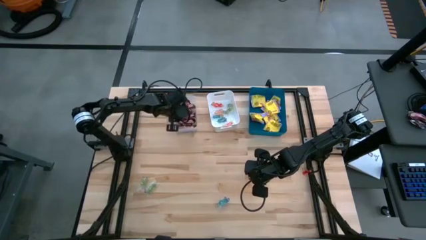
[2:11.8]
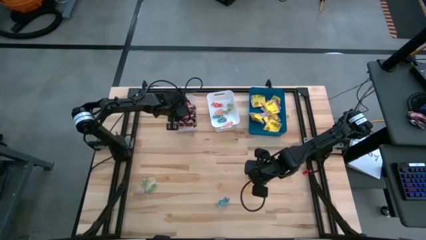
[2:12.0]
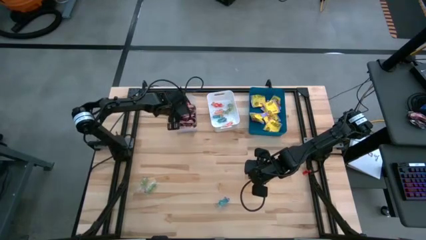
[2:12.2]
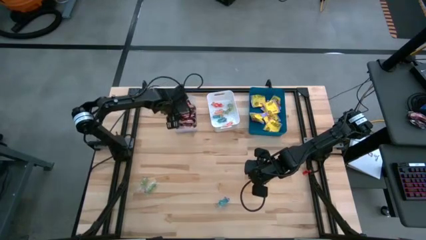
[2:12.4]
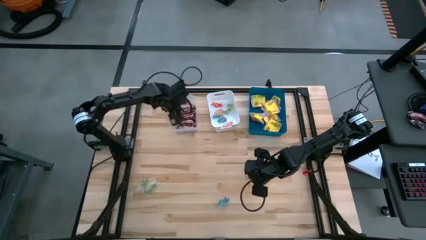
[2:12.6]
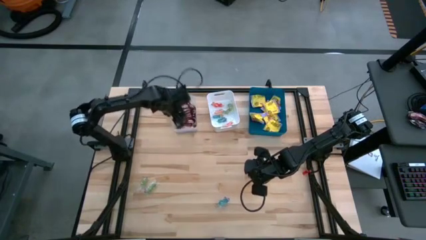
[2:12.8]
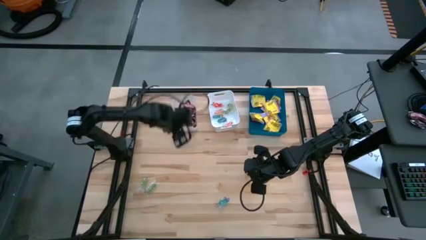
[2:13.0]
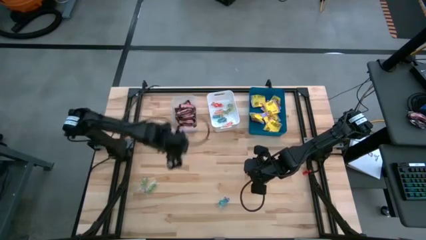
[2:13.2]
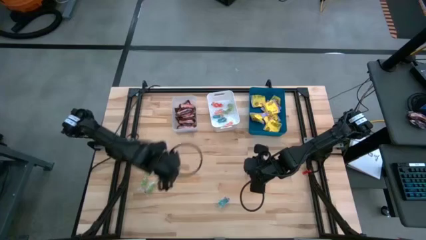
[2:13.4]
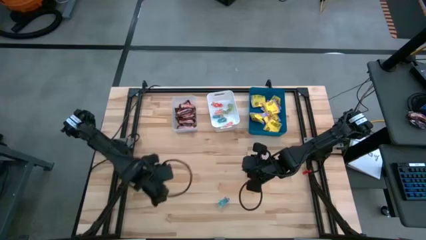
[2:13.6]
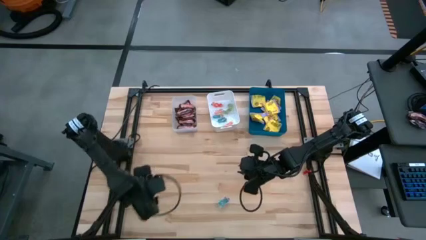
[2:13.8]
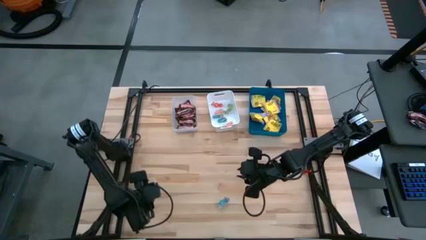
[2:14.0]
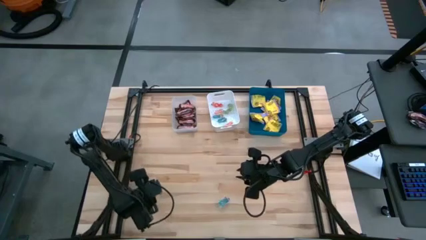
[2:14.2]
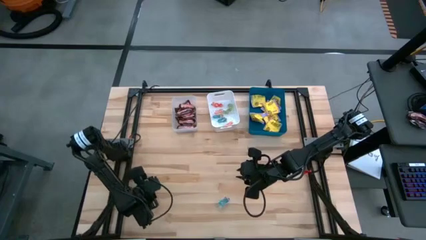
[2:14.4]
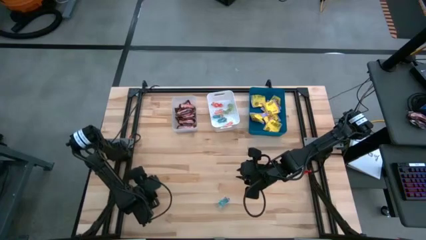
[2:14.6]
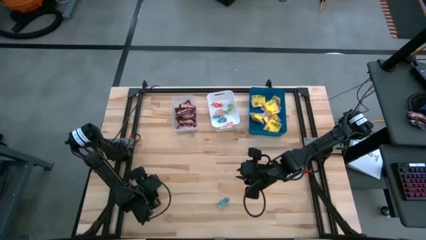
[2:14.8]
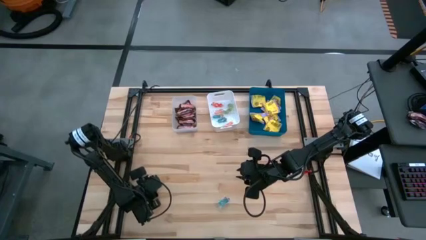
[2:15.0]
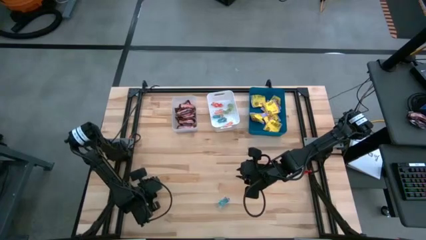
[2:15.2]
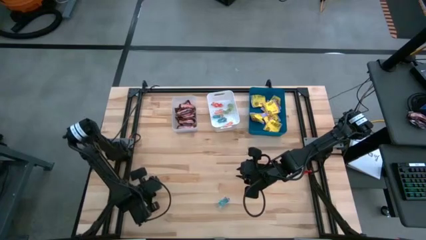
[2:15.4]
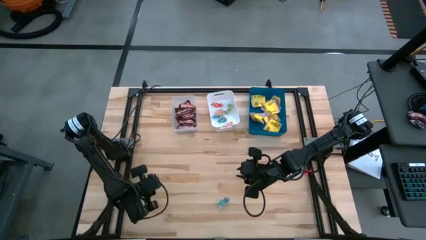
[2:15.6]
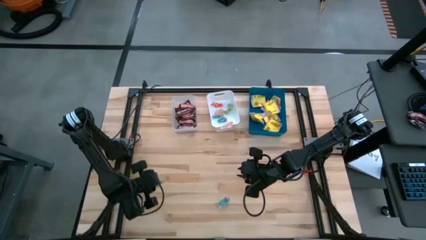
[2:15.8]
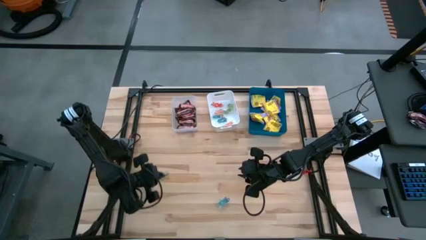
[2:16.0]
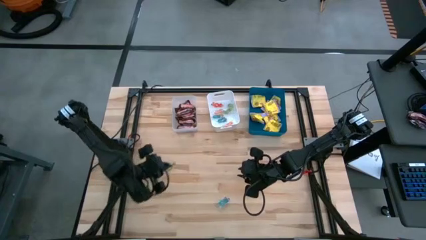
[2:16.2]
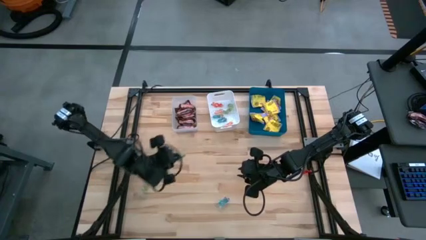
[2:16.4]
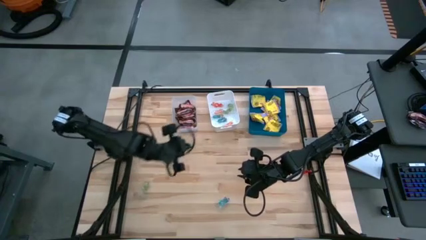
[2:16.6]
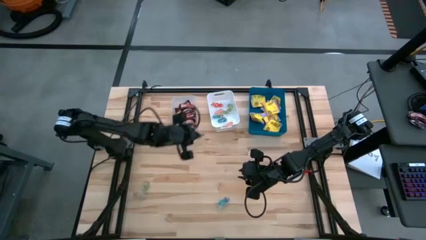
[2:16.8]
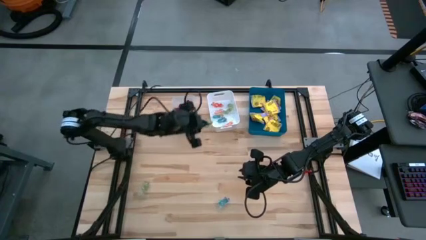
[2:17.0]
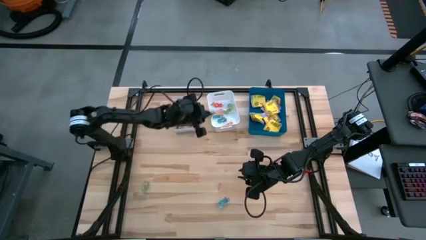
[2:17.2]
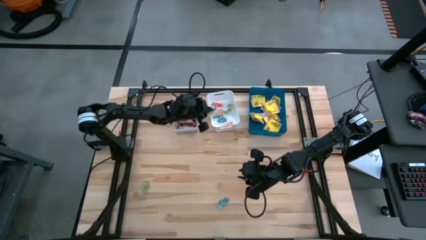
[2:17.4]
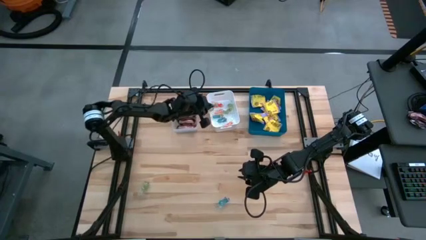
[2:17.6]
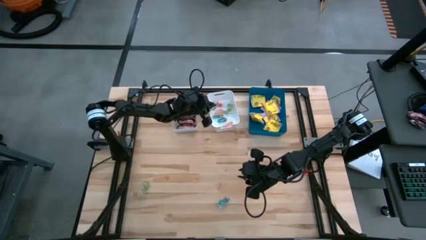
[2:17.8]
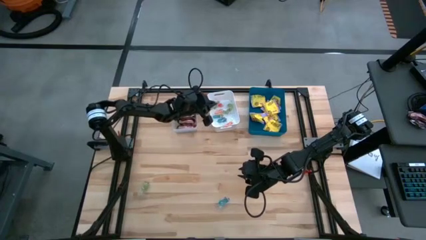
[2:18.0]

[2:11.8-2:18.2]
Task: Sort candy
Put the right green jelly candy into the white bin

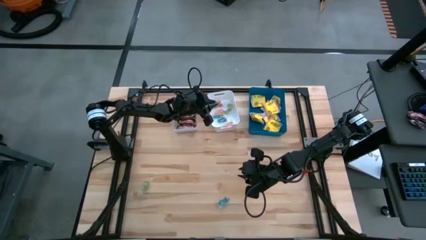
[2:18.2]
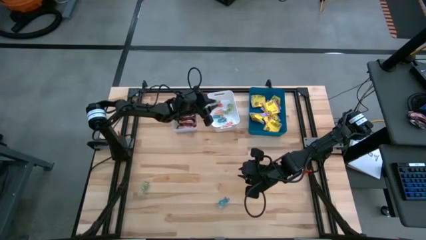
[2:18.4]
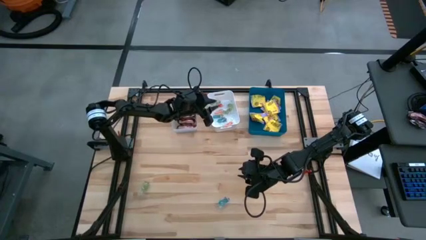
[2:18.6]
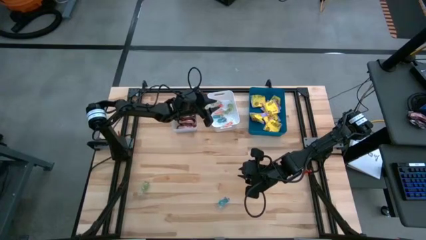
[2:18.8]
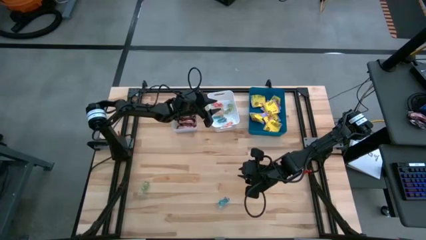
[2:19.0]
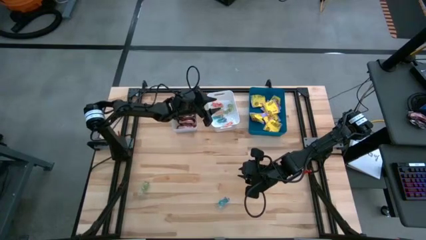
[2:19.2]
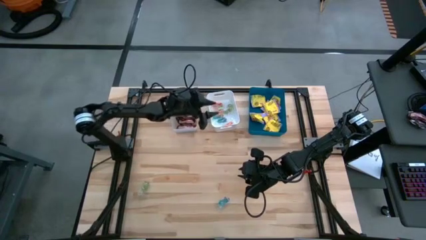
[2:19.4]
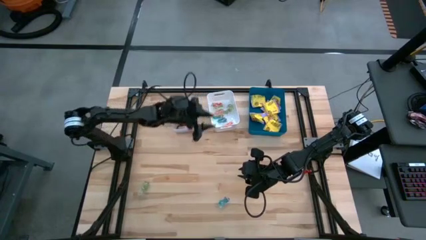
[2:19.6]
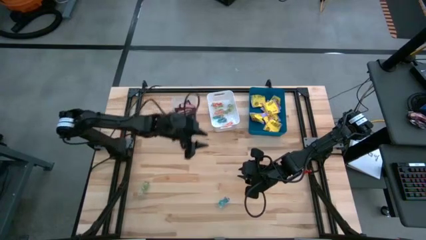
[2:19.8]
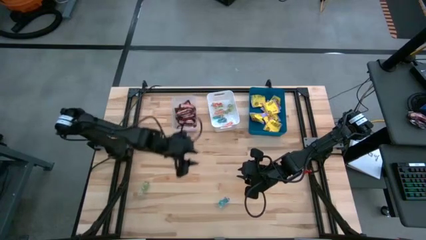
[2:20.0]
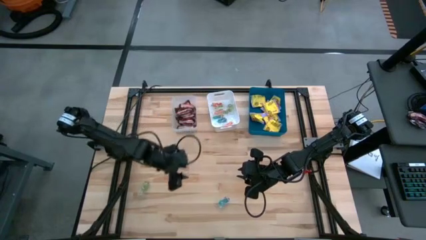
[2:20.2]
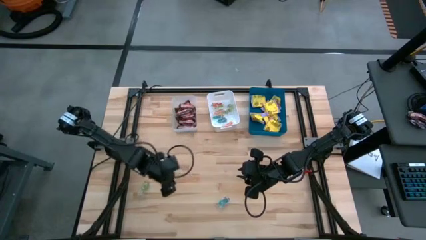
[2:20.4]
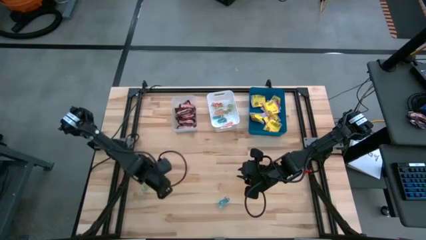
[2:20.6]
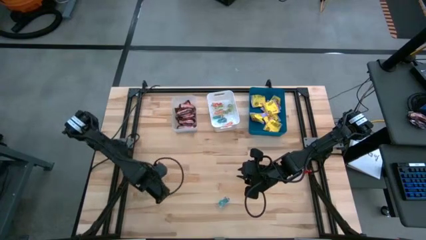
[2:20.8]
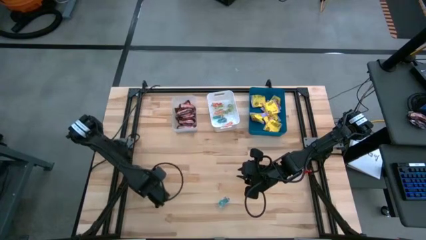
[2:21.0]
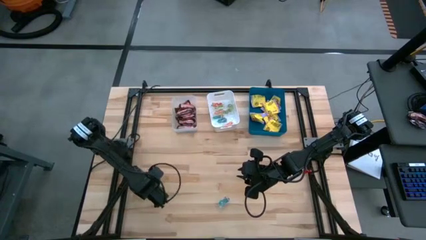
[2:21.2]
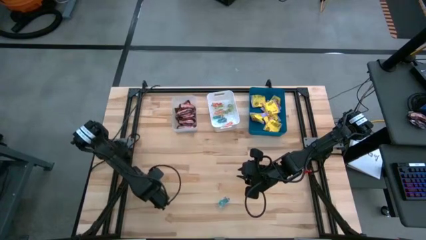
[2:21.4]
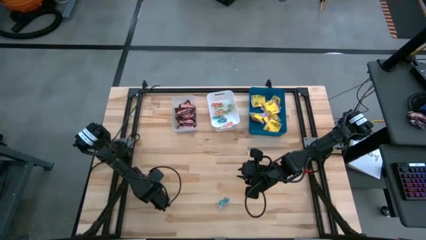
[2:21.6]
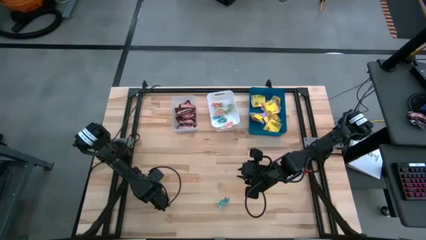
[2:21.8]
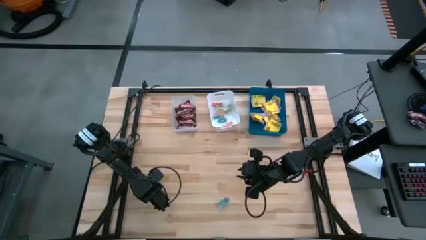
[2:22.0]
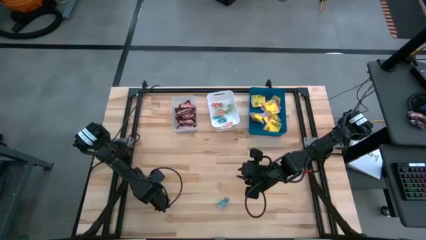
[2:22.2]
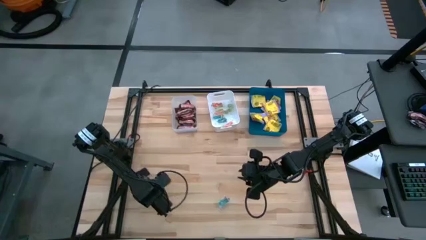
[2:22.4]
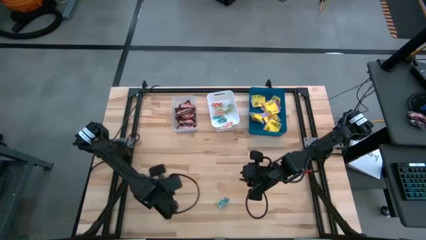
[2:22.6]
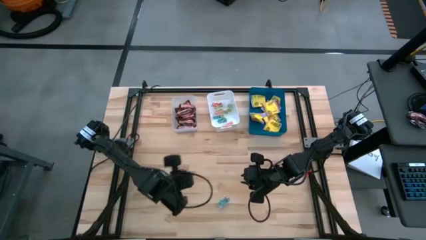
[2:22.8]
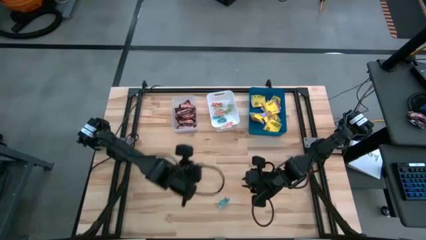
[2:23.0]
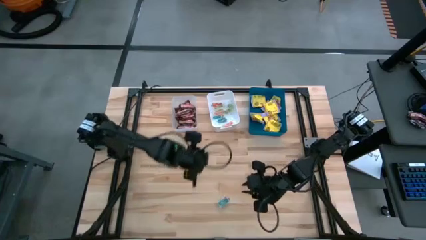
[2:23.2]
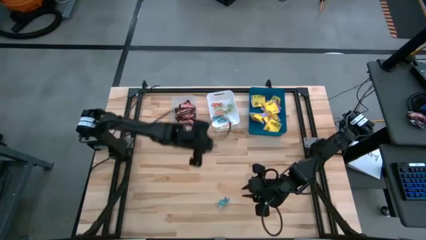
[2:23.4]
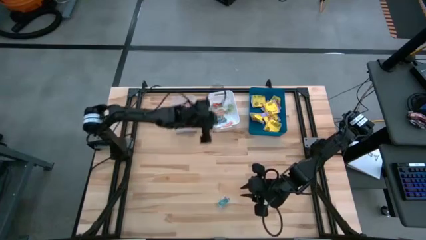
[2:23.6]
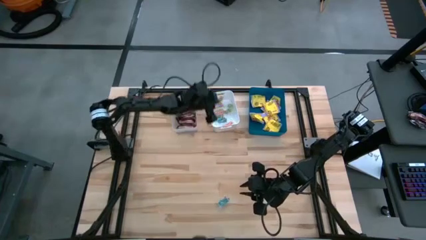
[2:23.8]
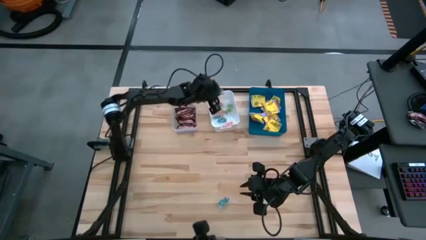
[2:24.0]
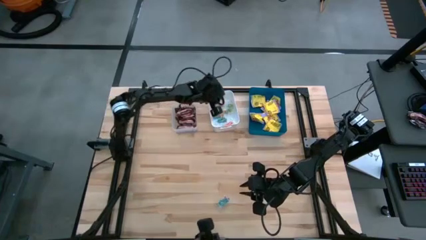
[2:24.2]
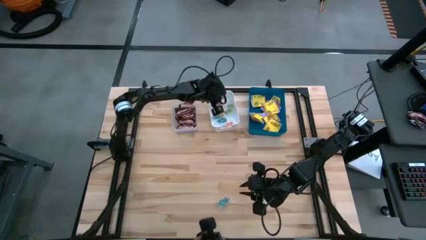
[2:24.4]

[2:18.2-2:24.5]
Put the green jelly candy into the white bin

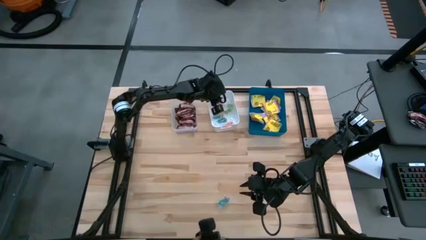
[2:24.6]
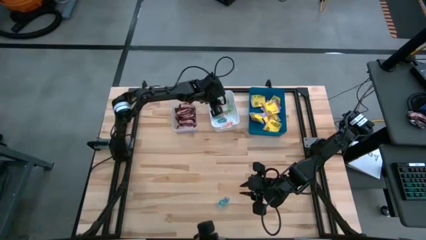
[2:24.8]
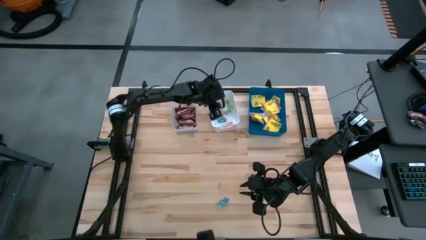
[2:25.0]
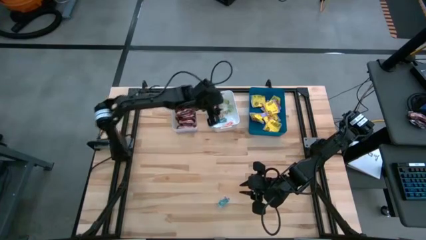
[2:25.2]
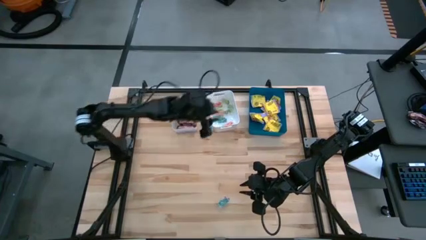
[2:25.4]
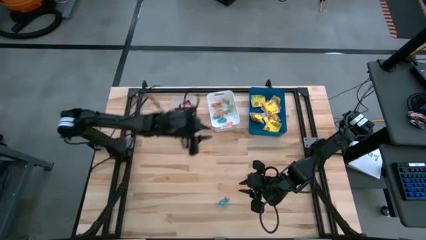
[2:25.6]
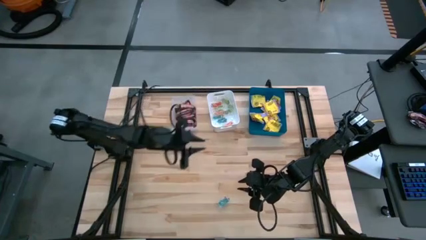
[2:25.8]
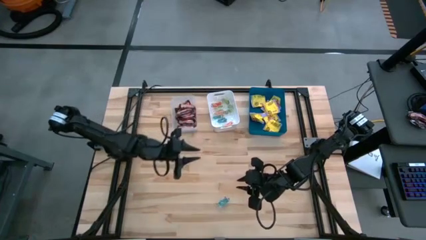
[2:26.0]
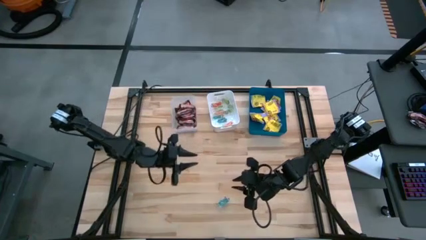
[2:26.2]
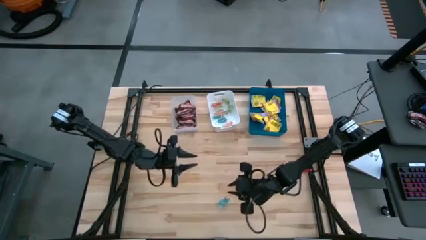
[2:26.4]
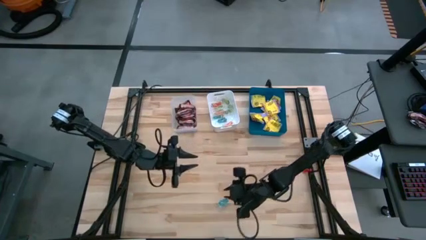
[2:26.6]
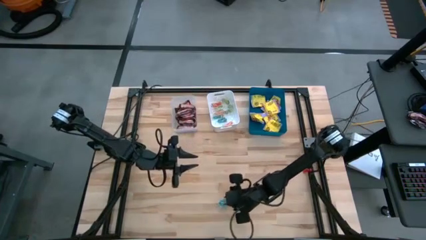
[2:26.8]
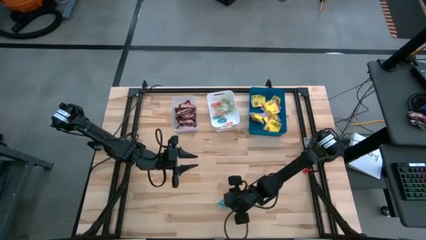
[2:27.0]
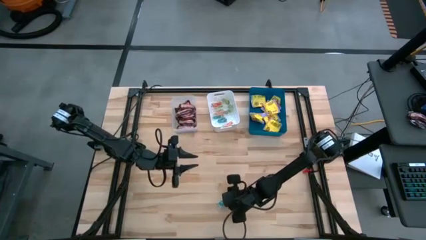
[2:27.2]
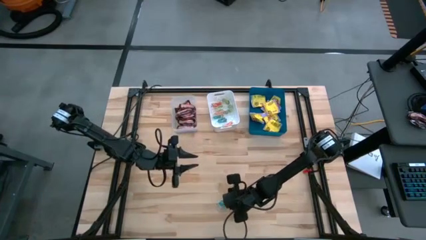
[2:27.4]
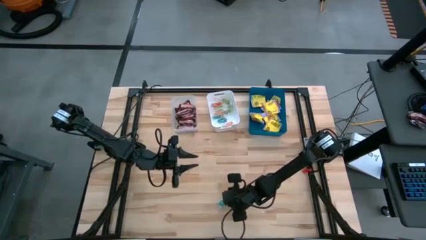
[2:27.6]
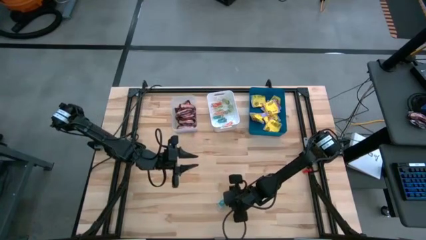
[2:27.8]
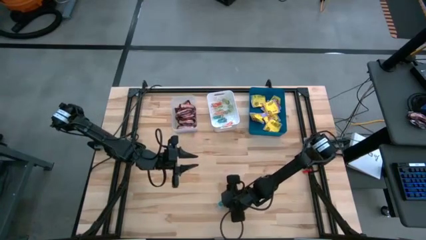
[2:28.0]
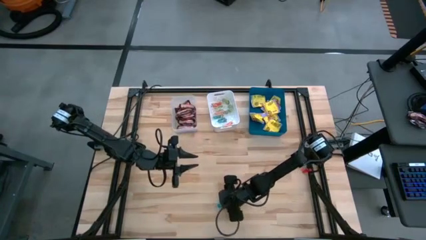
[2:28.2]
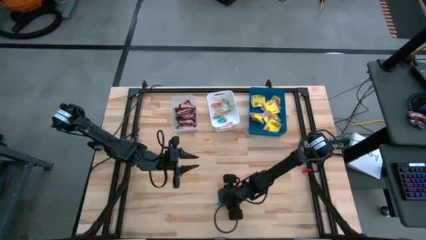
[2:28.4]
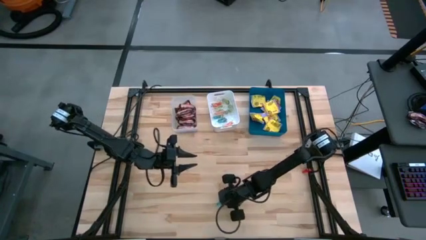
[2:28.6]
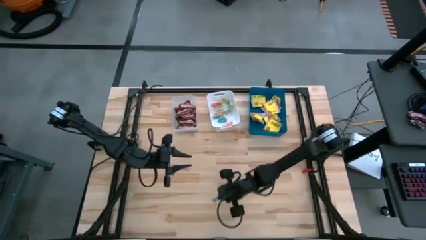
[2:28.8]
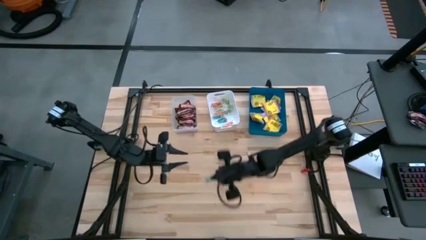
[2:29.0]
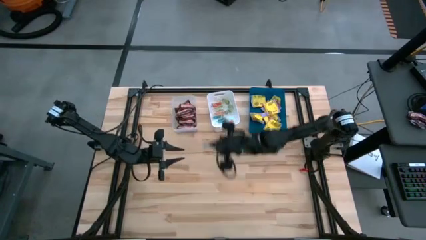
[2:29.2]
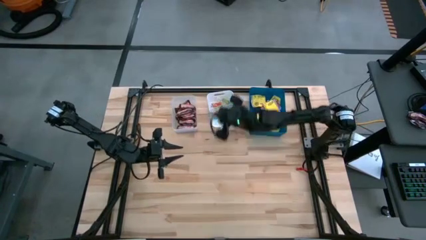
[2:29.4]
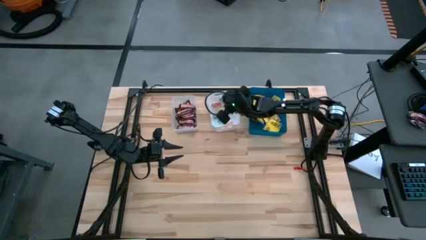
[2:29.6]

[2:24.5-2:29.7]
Put the blue jelly candy into the white bin
